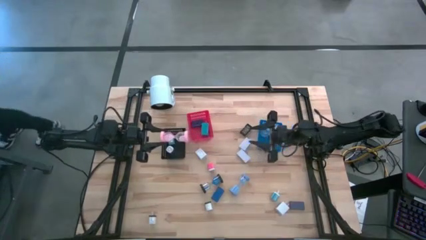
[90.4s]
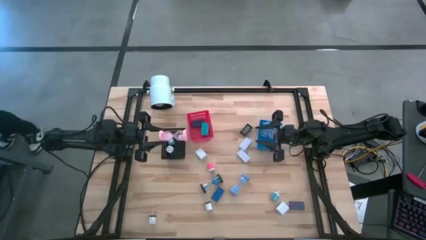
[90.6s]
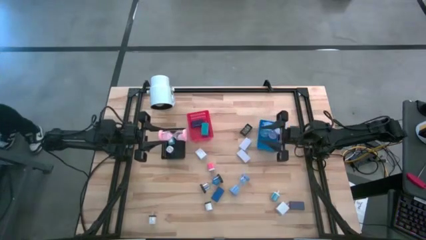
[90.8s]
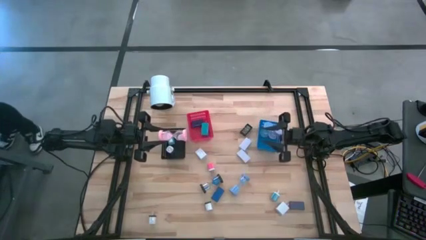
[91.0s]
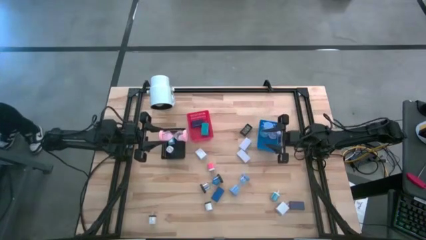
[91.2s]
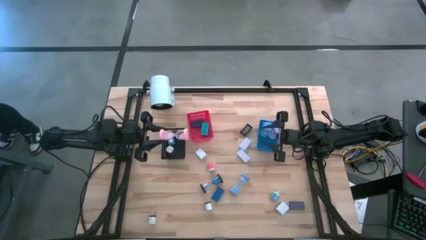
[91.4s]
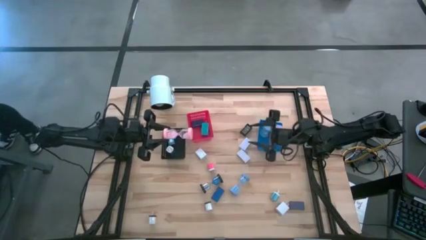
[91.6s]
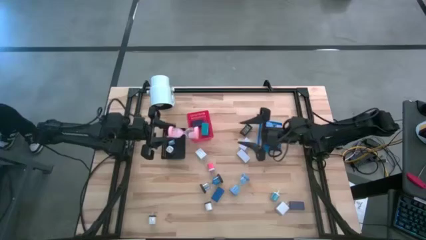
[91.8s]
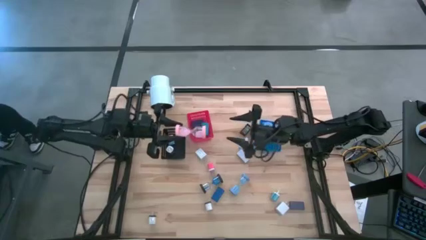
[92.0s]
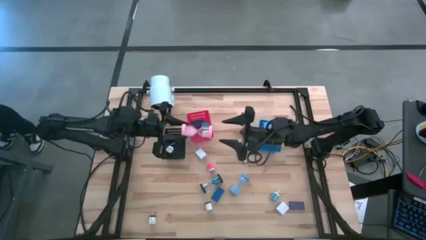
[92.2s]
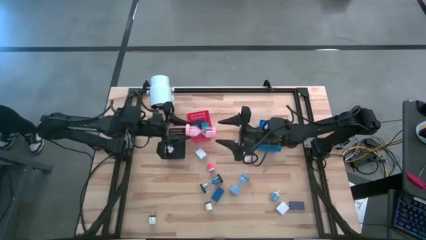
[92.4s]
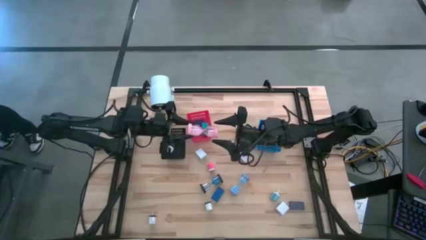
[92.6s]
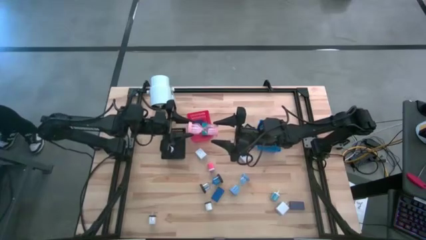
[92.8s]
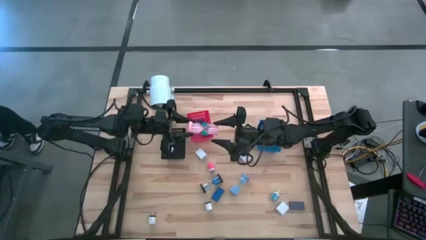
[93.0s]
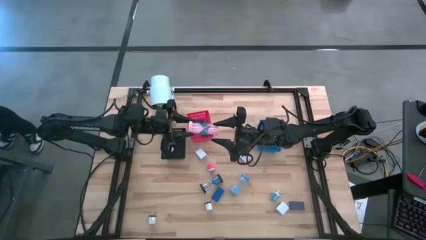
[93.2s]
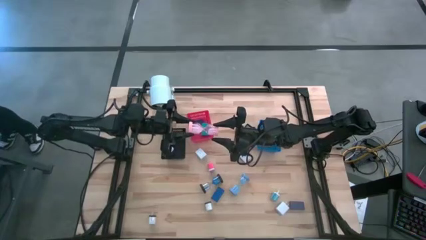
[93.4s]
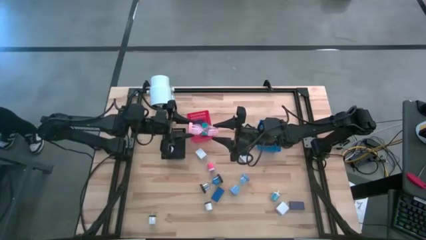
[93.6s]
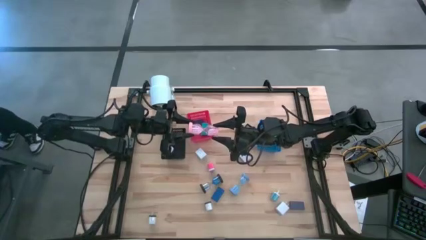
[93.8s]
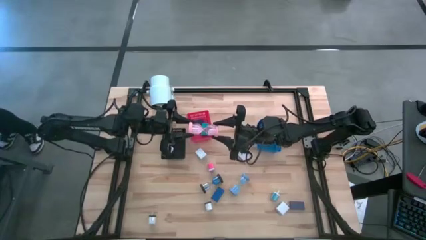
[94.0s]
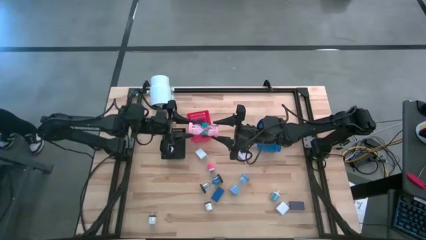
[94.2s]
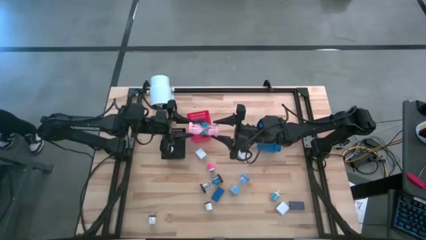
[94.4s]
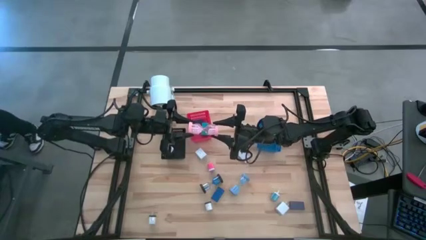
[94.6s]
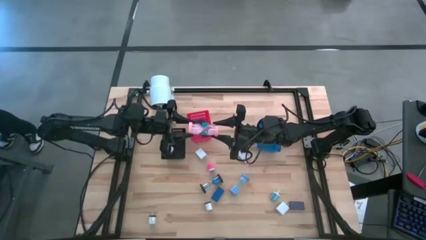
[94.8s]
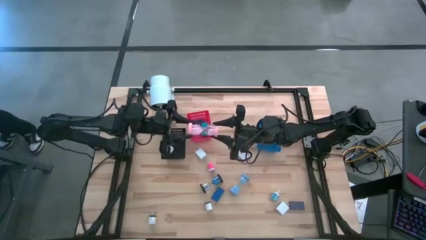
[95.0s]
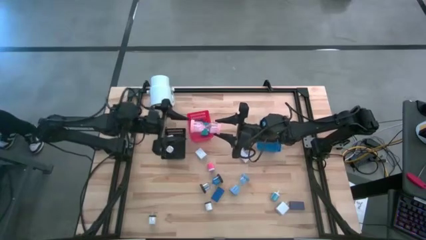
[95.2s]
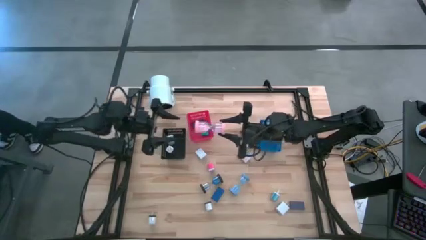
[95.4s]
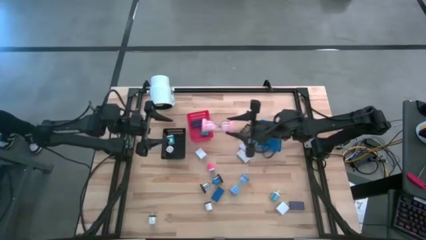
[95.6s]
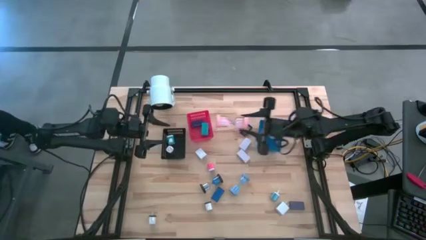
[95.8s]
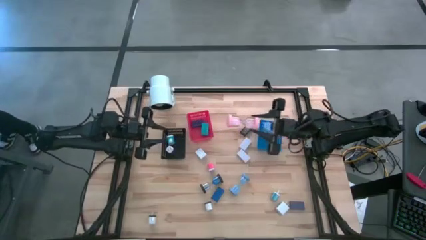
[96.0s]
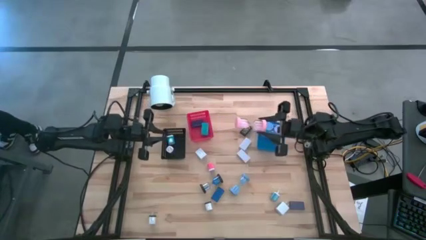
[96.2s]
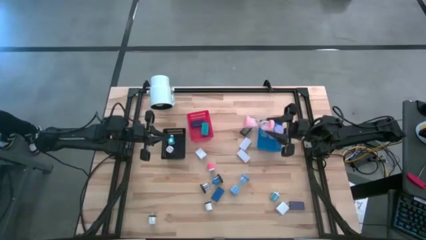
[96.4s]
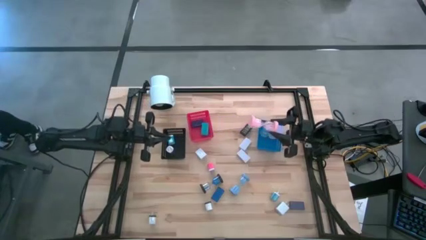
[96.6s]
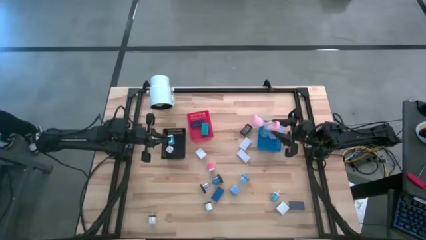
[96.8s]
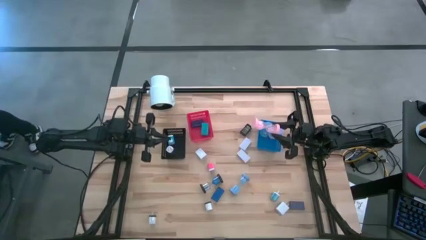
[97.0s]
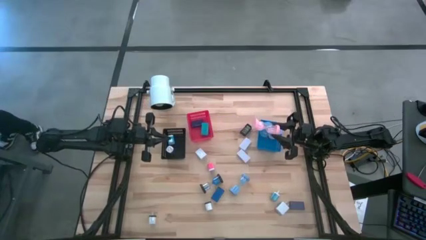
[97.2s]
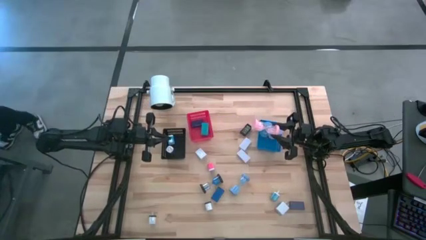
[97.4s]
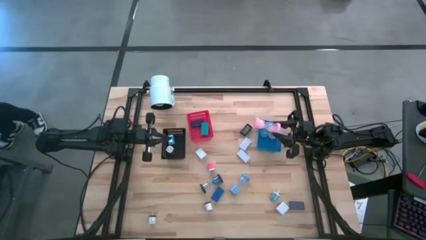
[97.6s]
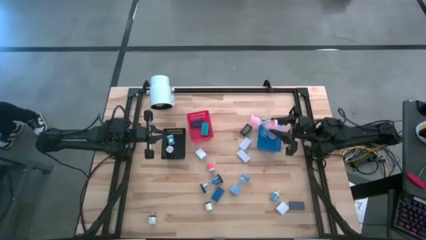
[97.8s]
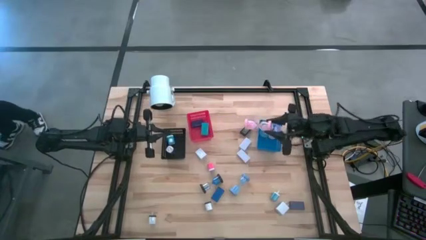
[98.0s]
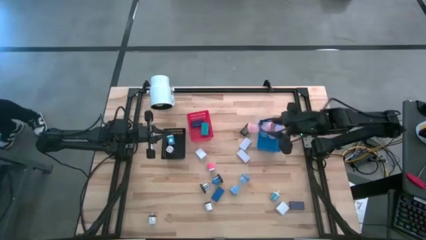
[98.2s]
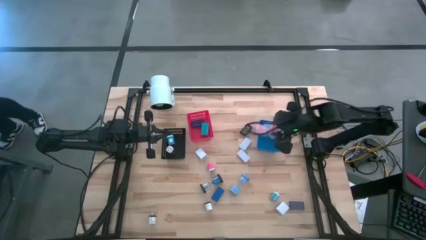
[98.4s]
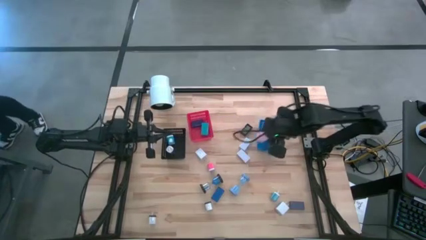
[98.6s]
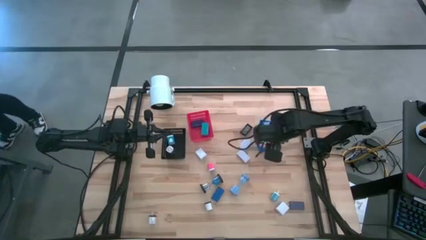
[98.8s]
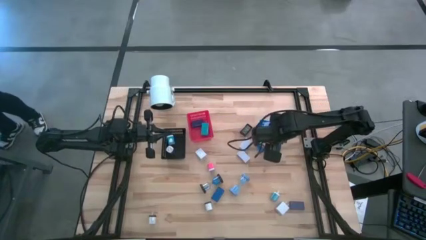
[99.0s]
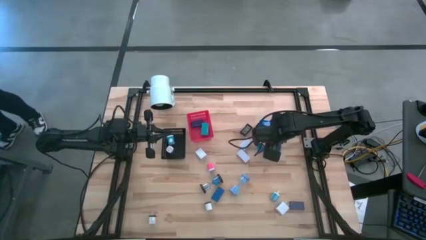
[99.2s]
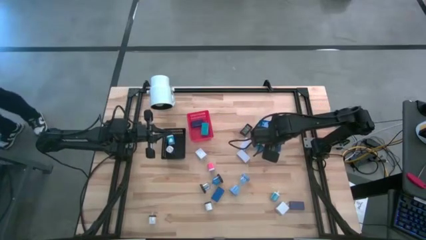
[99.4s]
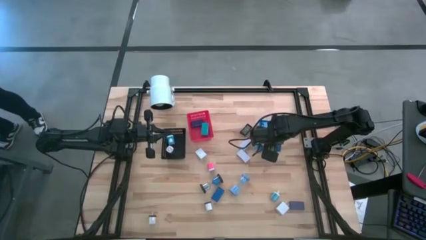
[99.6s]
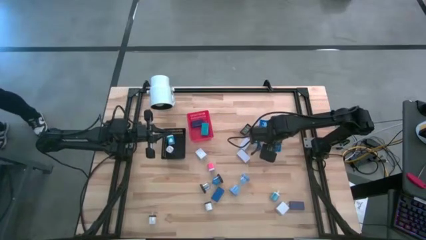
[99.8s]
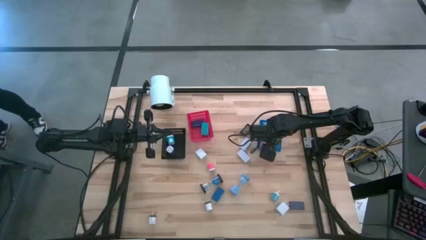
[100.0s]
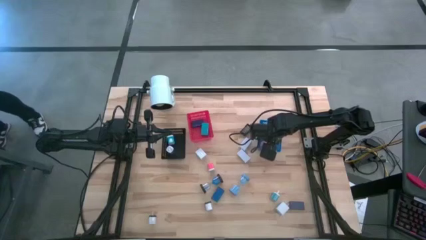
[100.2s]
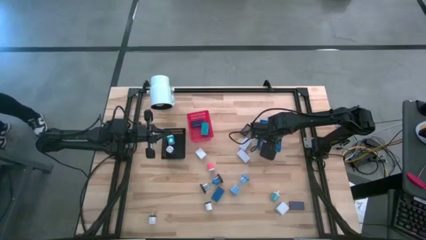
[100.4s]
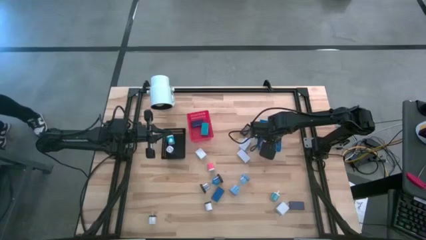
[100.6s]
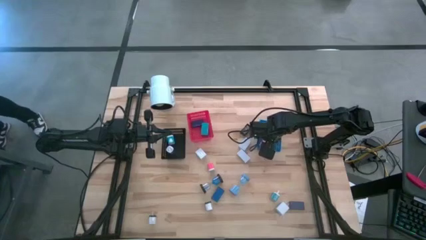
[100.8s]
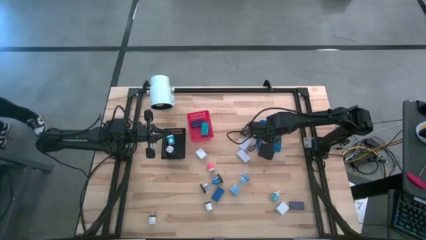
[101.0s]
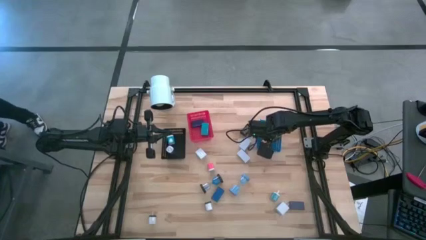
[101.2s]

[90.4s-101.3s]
Task: Pick & Place Office items
Put the pink hourglass into the blue bin

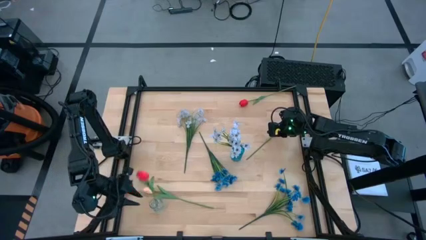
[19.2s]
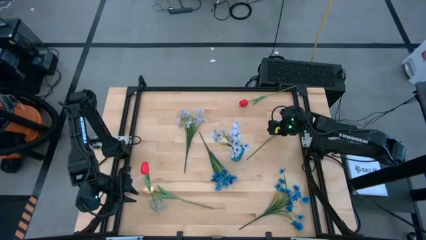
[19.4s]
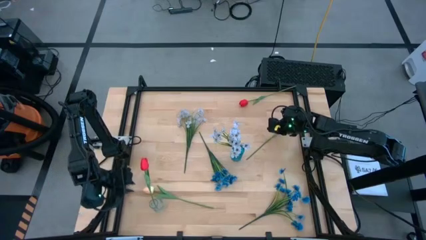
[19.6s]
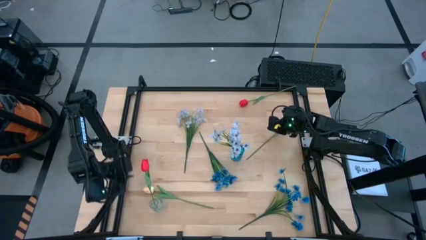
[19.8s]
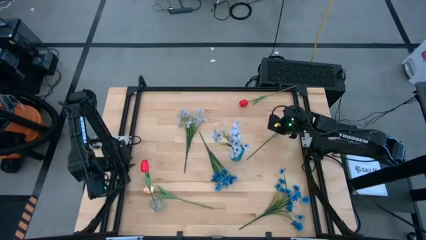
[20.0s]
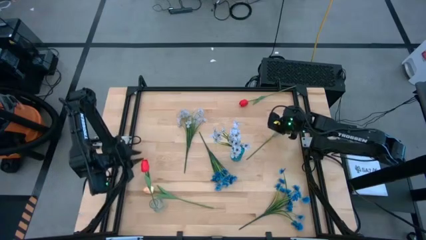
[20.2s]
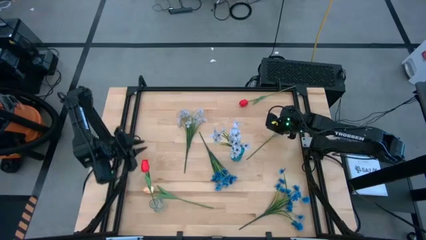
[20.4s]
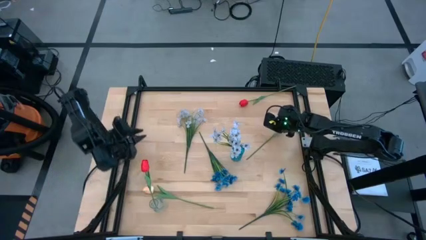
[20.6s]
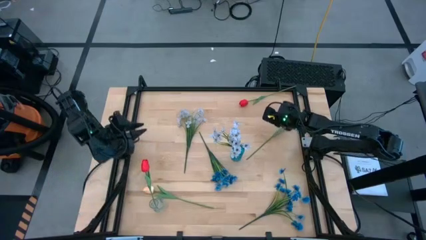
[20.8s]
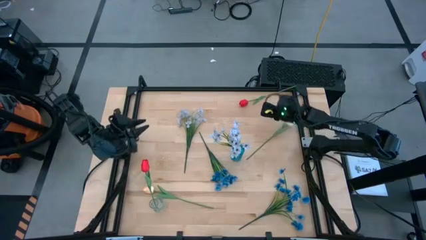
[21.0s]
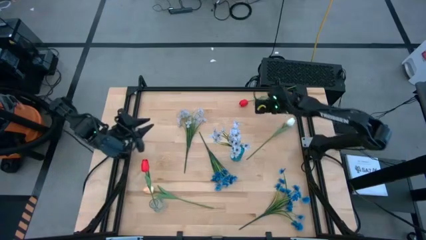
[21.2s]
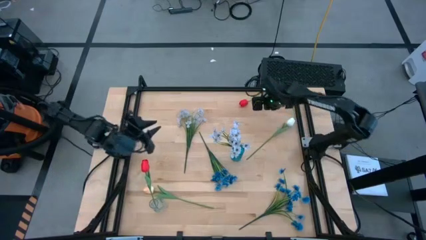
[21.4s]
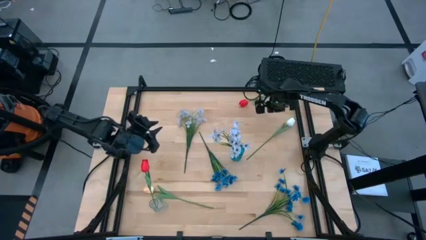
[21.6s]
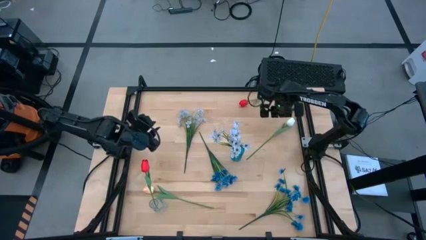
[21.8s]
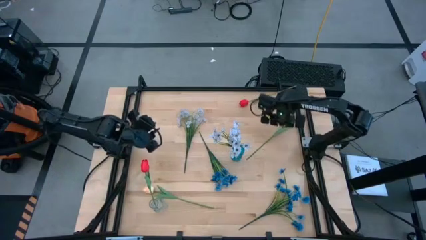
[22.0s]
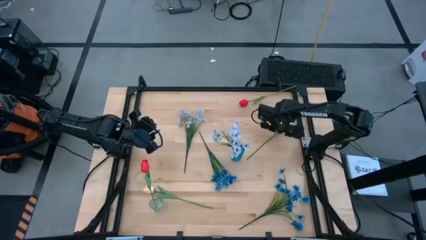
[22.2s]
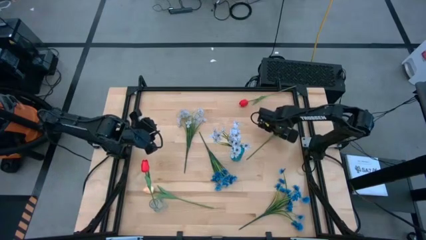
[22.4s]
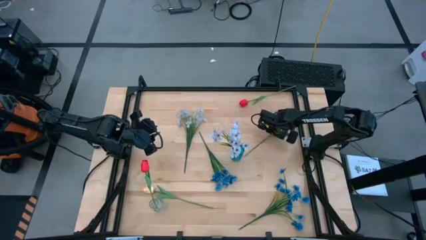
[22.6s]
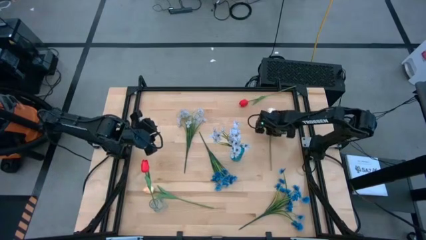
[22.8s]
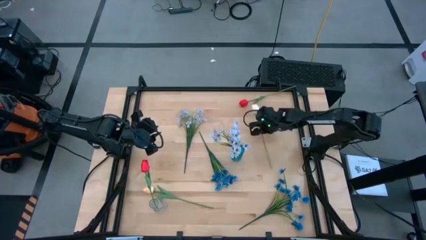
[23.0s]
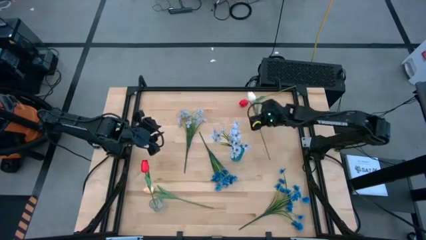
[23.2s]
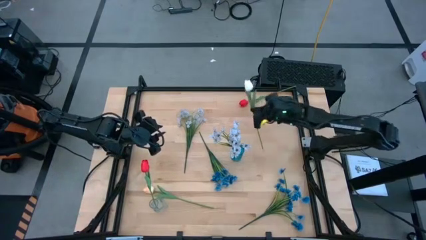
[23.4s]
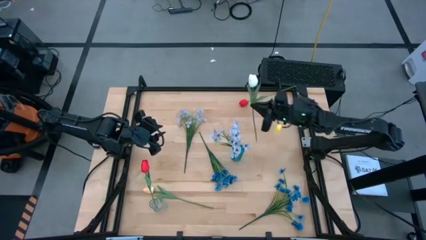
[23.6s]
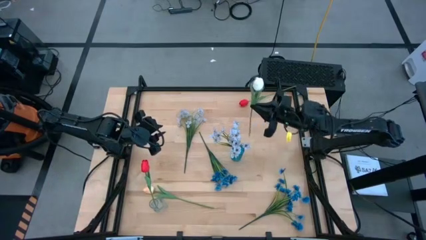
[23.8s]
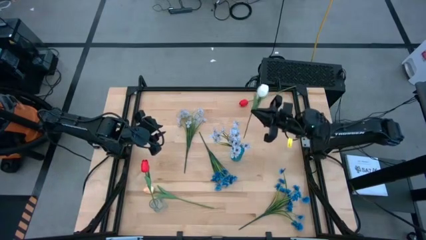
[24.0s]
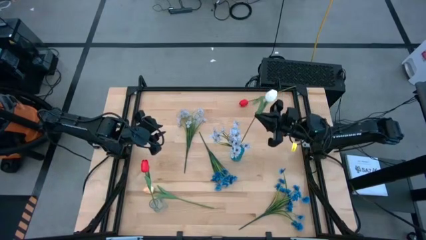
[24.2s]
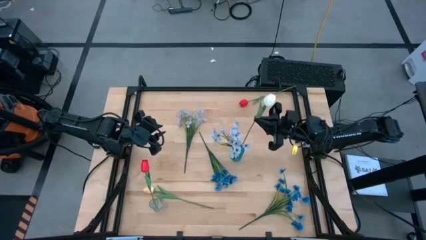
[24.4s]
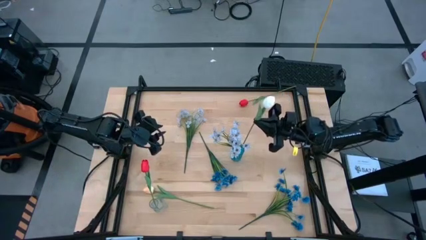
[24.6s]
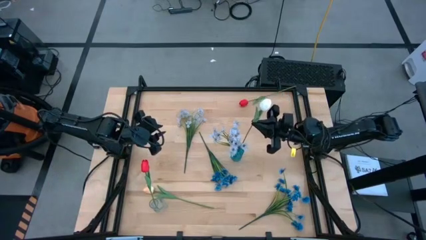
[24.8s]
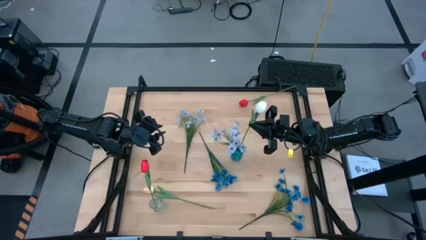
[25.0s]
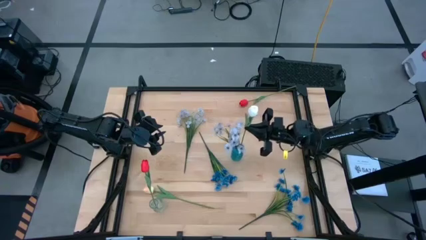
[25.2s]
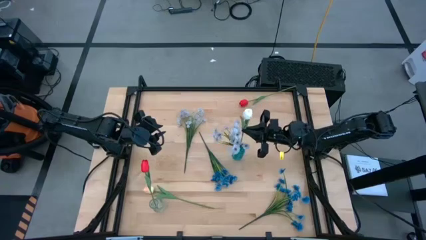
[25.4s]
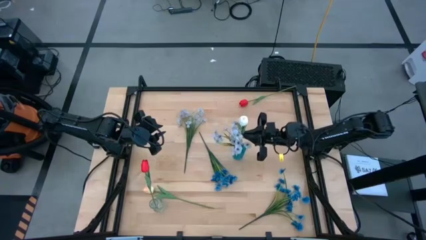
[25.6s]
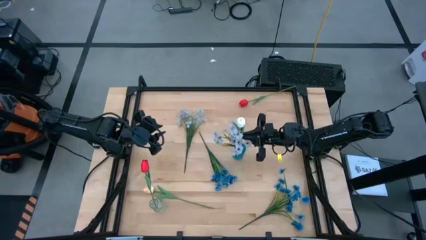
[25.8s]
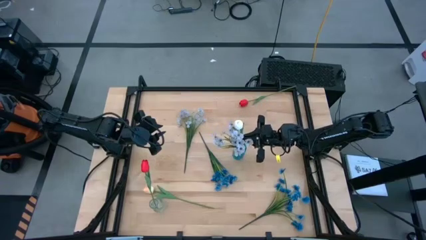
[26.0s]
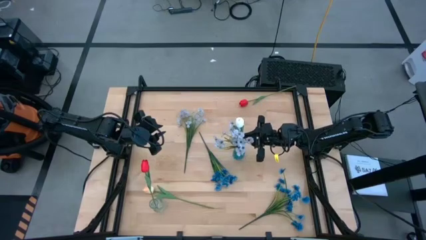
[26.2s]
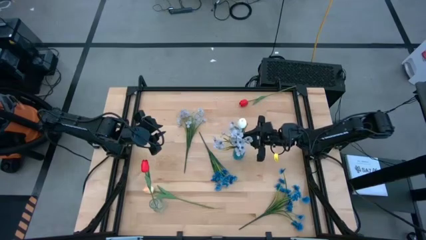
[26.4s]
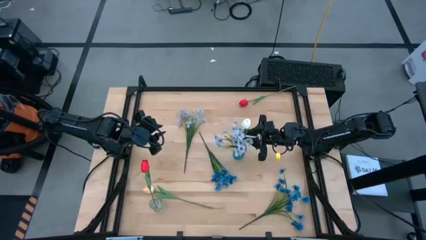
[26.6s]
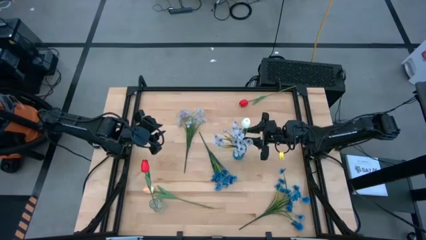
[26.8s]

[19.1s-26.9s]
Task: Sort flowers into vase by color
Put the white flower into the blue flower vase
